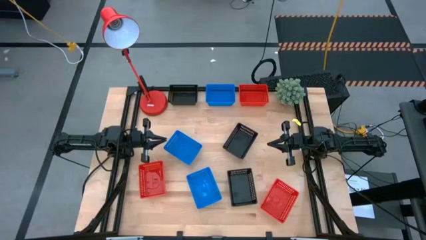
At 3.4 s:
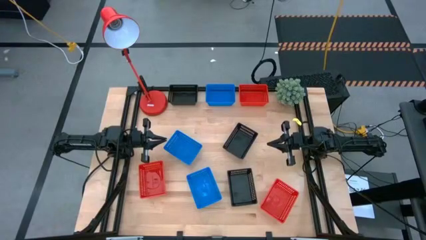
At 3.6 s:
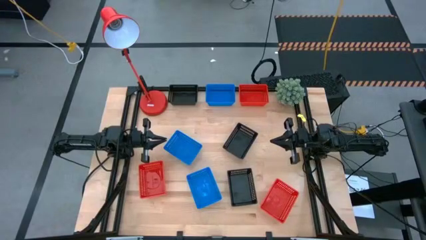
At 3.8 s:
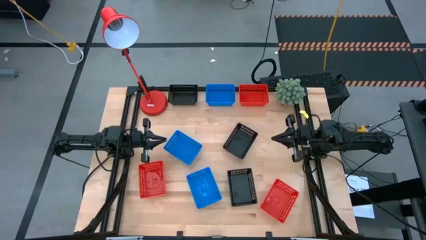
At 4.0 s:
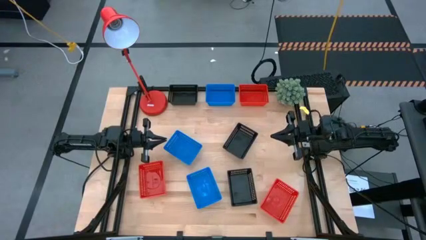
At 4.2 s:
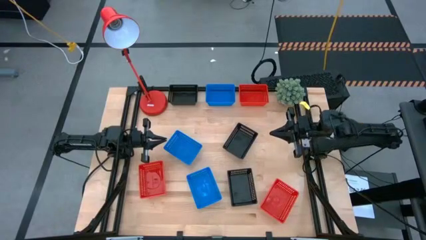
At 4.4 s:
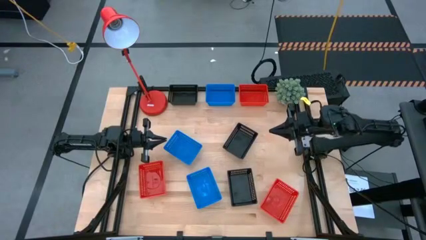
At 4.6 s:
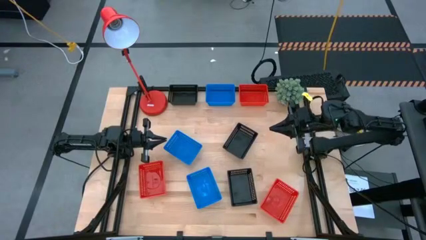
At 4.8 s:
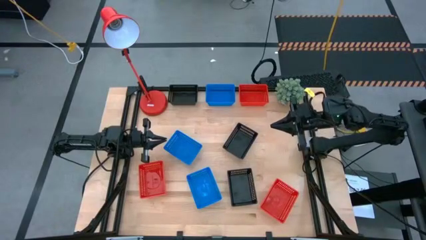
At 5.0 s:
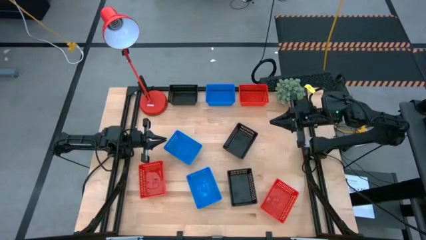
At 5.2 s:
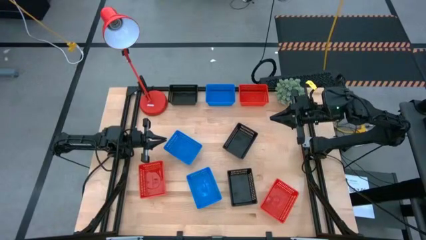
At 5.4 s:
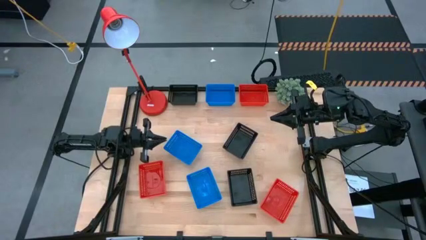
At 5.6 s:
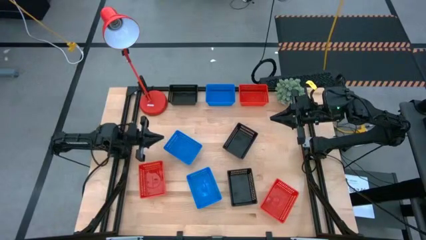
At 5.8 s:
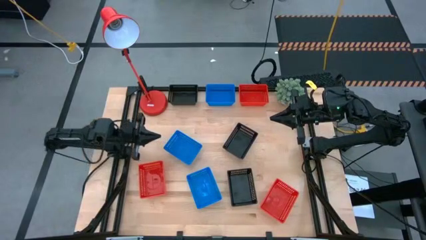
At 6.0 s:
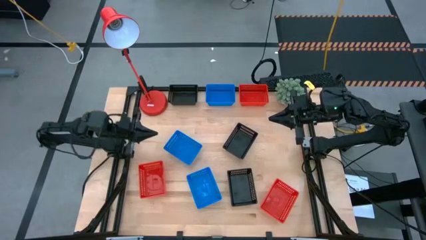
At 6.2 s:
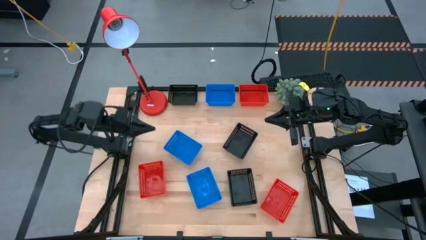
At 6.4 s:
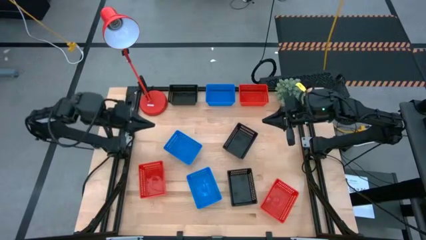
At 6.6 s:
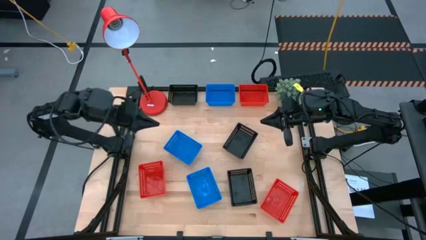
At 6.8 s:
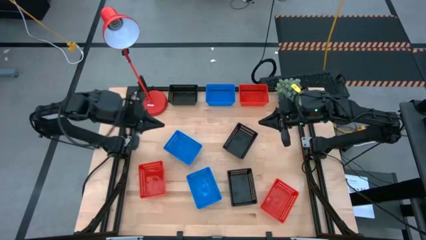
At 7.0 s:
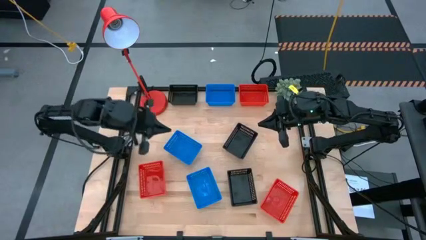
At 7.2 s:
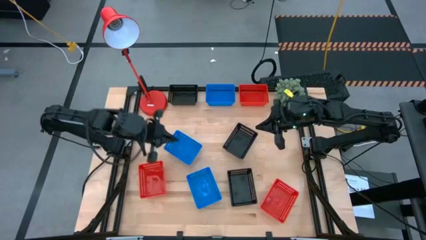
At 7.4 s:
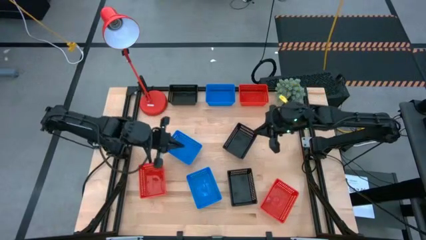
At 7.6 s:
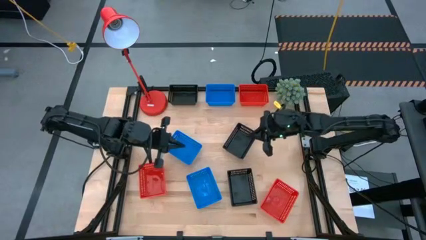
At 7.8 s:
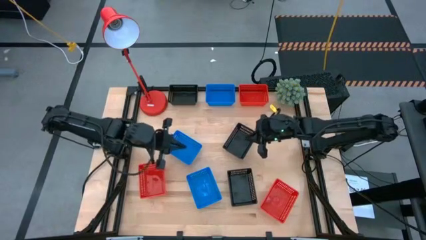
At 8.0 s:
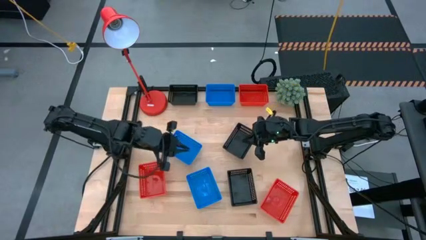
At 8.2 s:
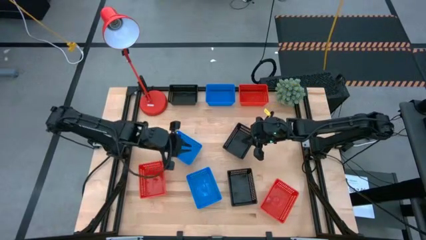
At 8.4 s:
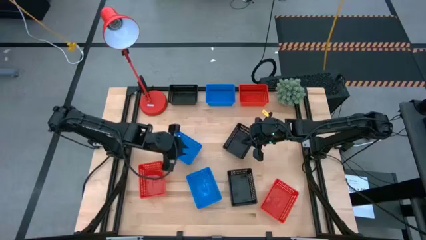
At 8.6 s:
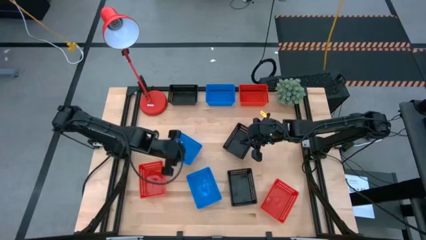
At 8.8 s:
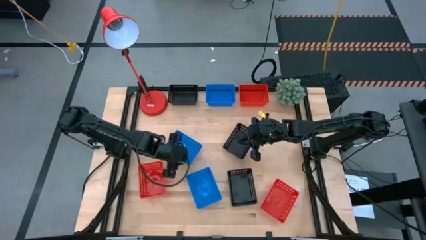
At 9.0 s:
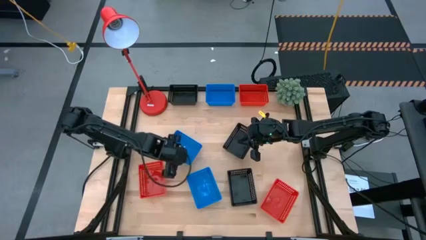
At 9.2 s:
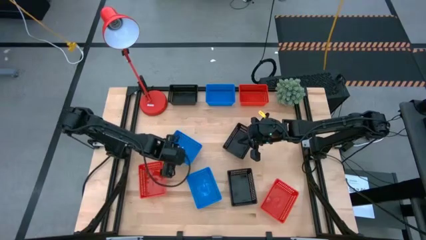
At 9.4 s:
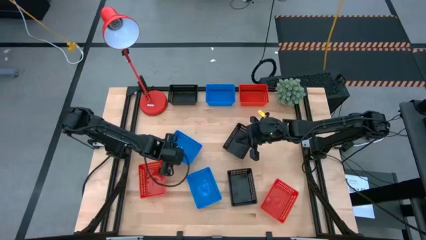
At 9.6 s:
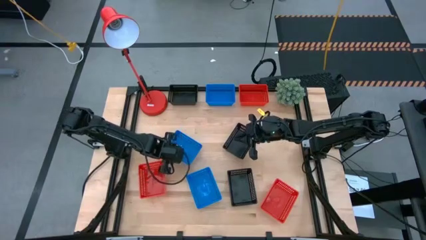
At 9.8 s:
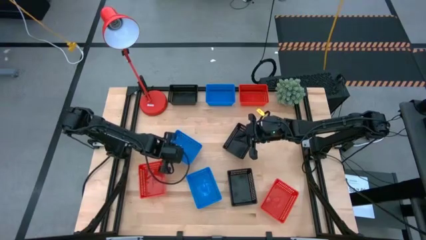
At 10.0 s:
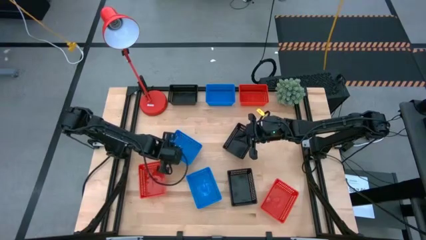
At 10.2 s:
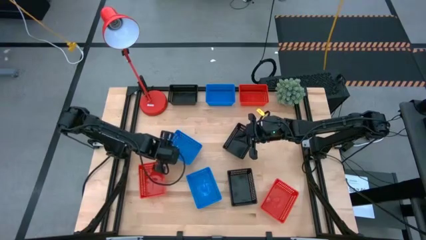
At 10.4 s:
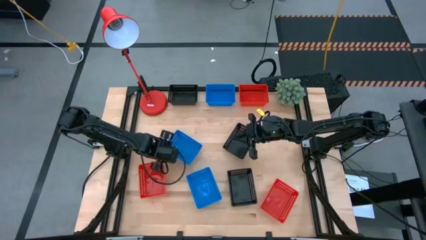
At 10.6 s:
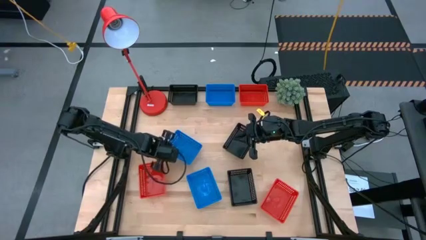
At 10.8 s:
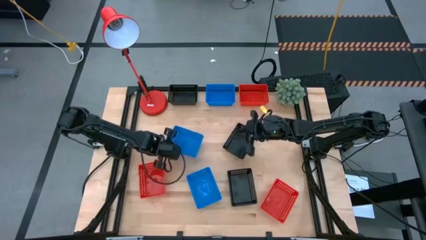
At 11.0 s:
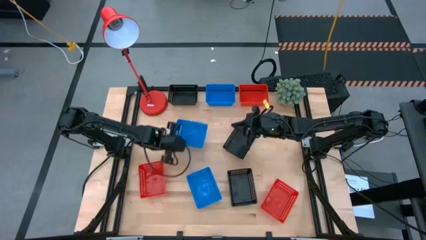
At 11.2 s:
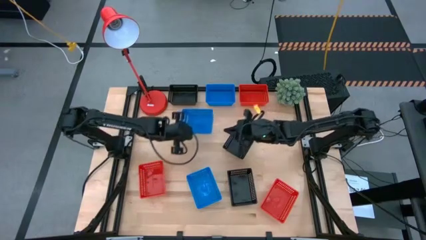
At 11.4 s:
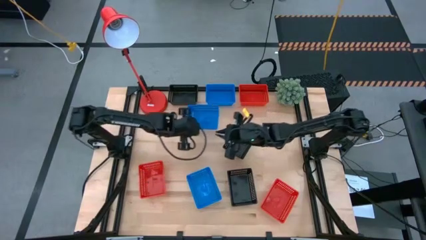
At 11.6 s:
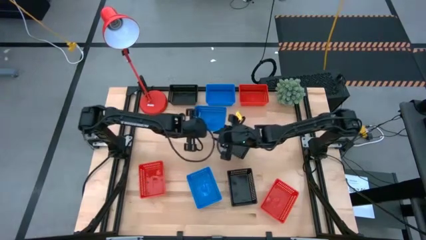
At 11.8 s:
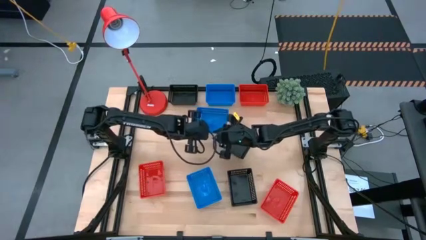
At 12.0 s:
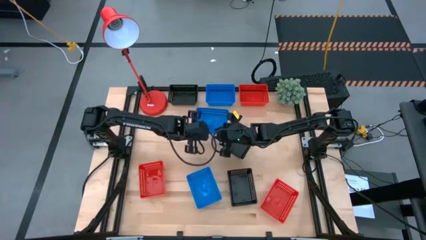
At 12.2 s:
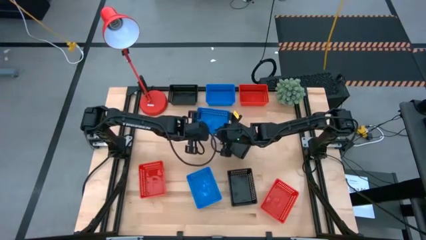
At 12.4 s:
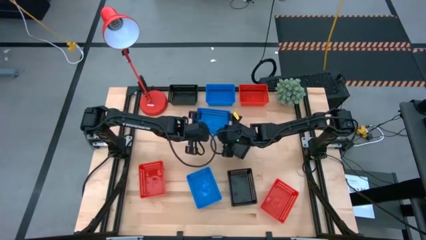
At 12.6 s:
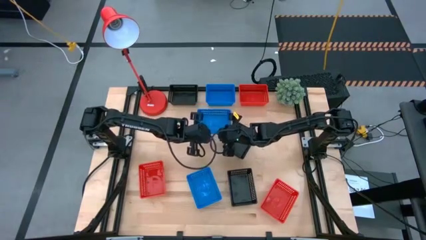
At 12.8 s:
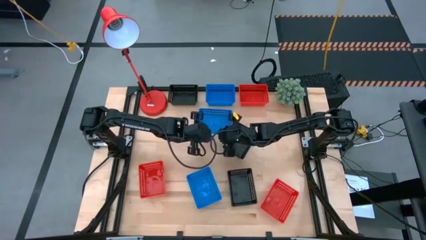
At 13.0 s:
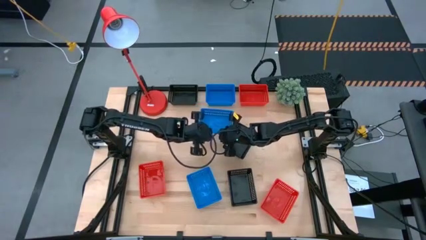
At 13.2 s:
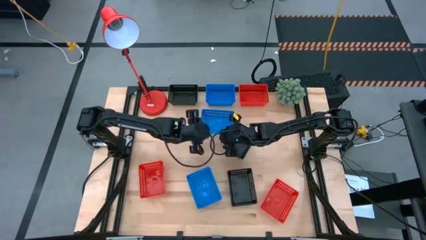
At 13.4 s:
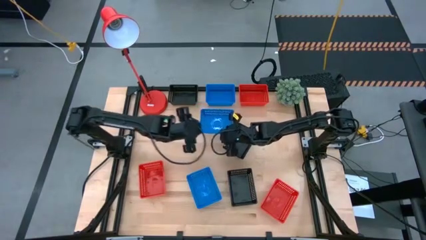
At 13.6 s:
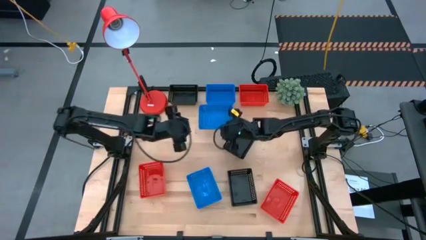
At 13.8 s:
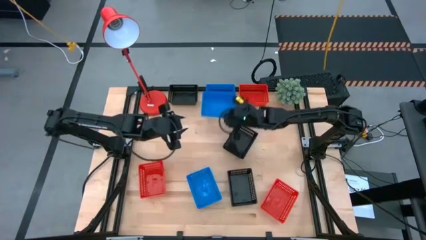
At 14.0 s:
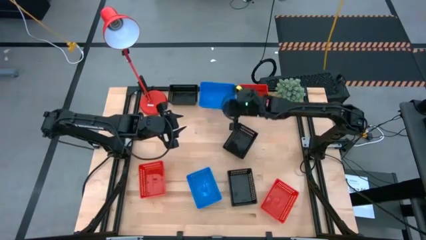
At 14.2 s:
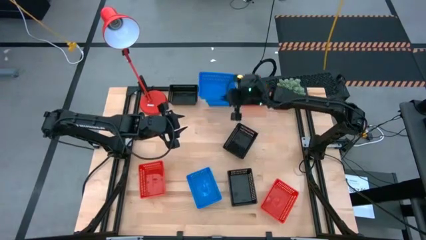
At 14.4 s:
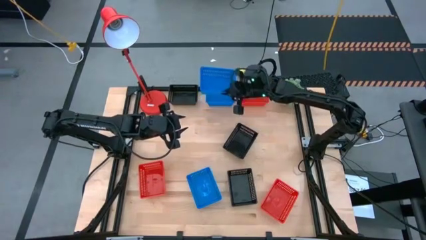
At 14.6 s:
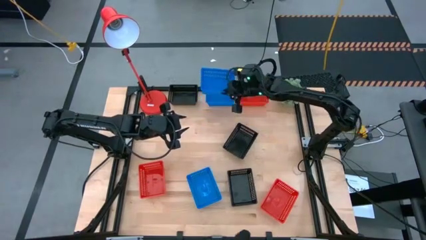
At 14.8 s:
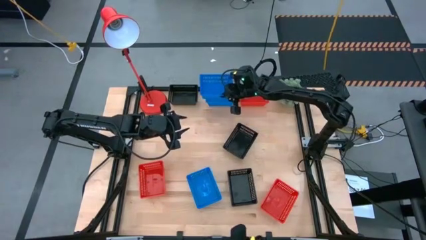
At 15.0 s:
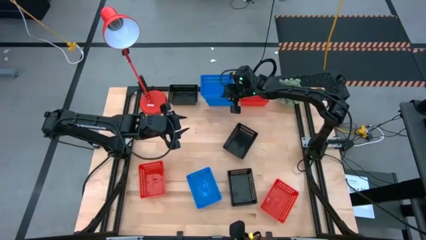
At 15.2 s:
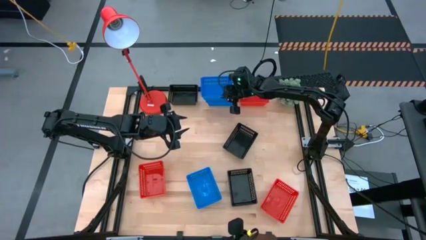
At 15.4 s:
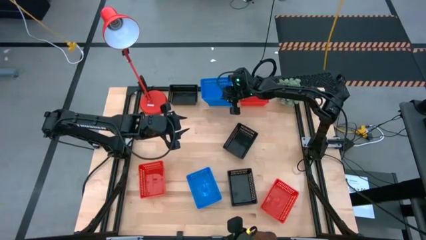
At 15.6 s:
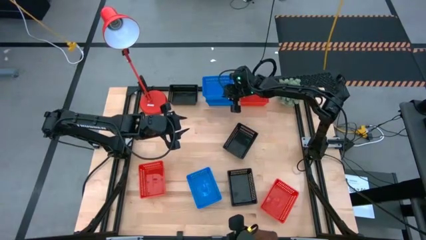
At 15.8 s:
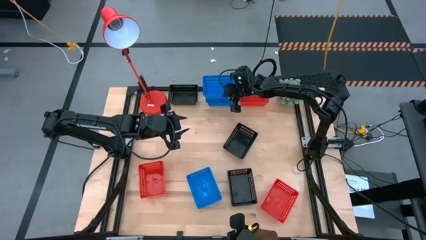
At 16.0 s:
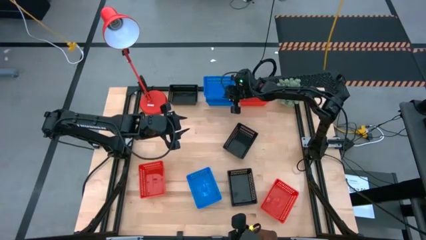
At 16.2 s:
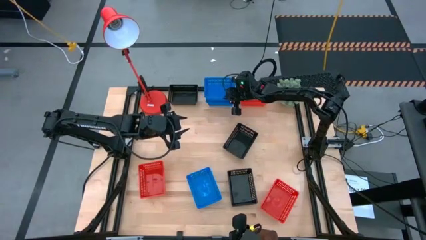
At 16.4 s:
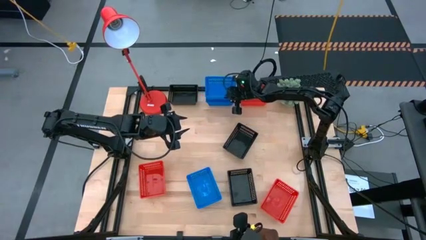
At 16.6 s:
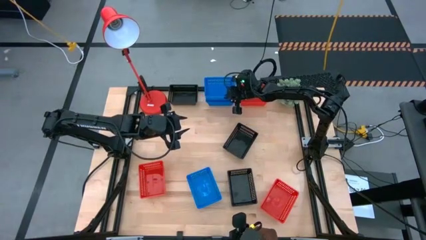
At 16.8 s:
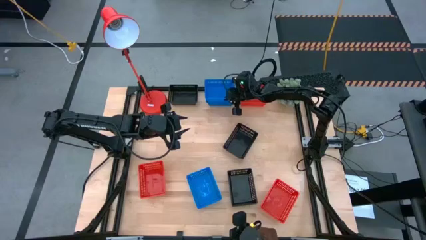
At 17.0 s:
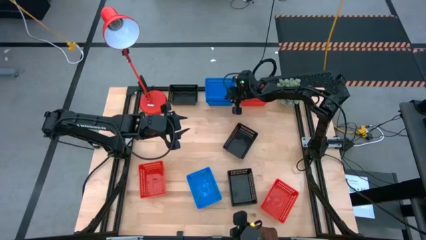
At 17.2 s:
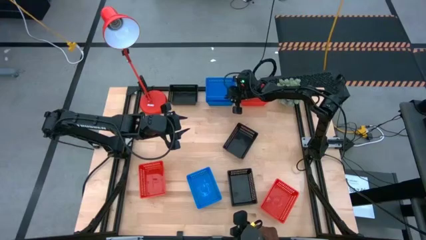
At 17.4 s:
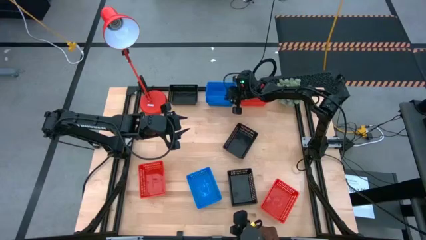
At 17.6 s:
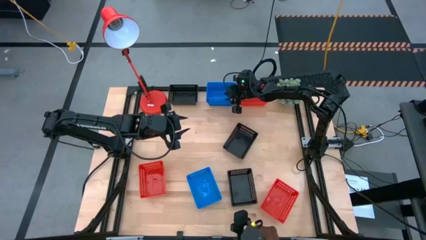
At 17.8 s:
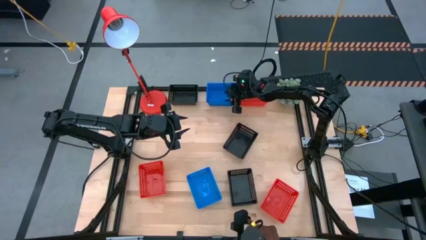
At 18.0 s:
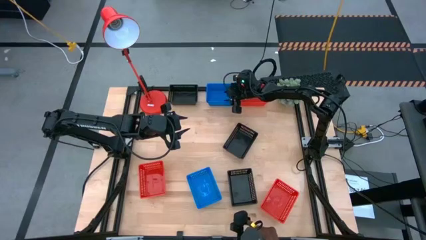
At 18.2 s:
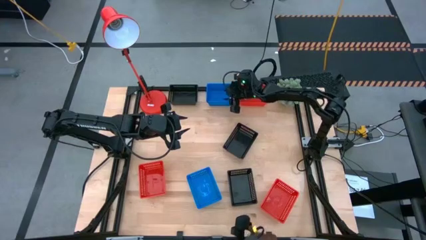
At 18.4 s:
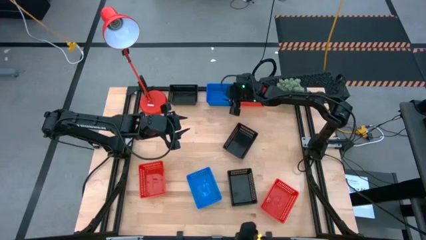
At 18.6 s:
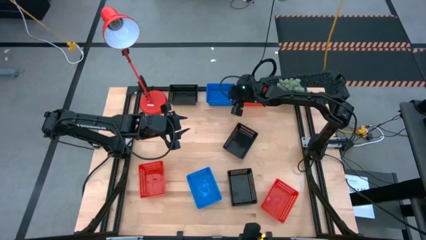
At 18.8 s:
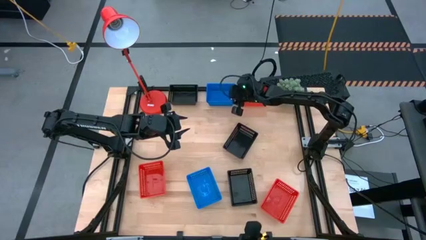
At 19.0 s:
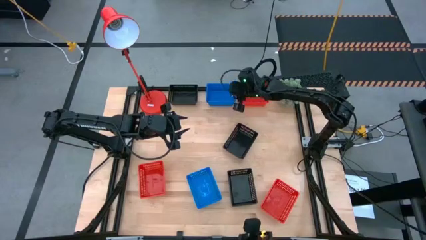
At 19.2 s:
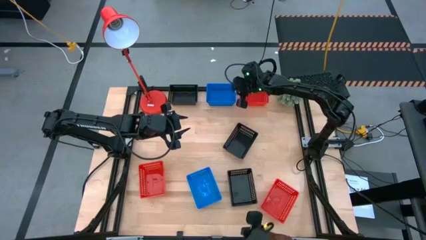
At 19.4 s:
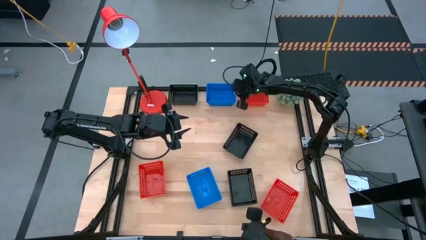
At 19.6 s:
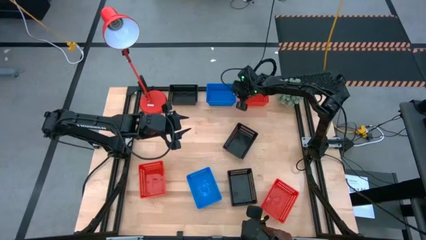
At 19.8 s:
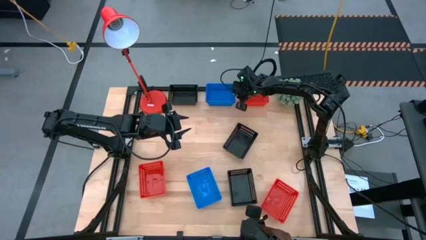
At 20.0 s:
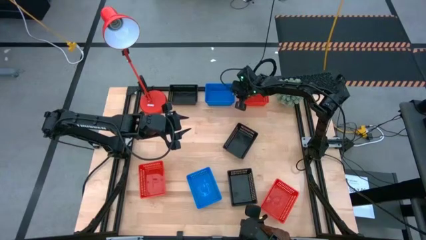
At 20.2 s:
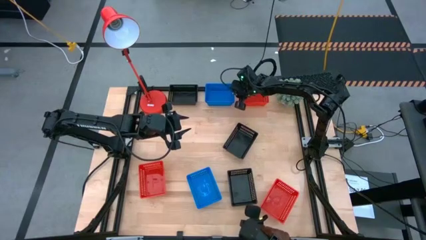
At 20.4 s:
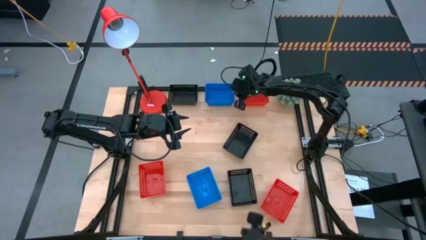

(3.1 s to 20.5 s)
Stack the middle blue bin on the top blue bin
